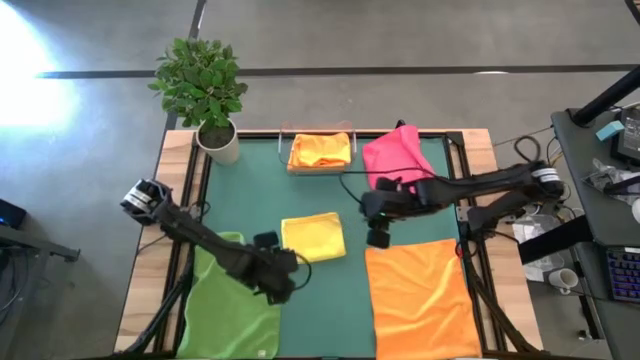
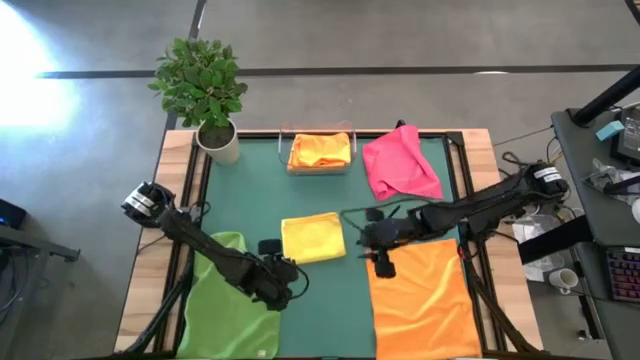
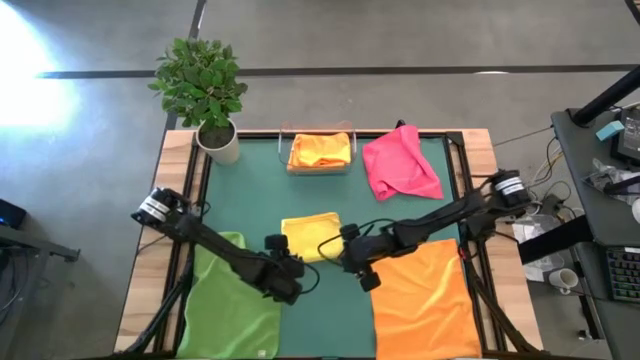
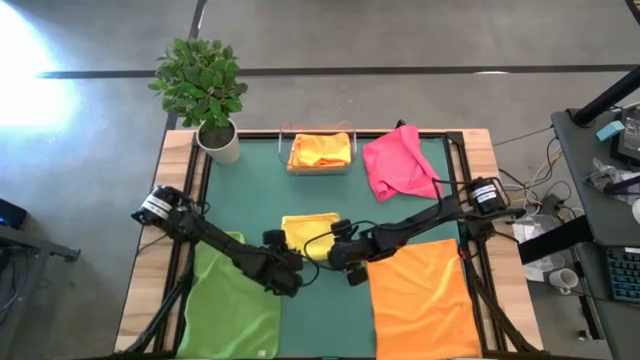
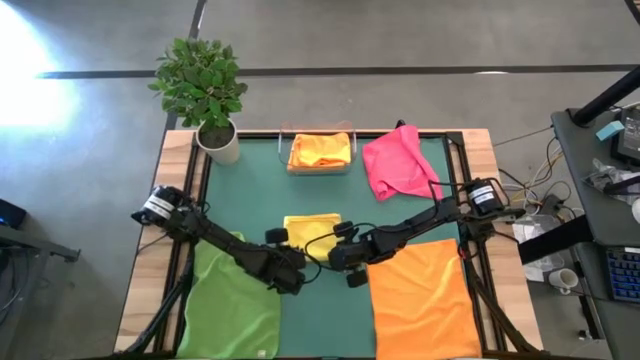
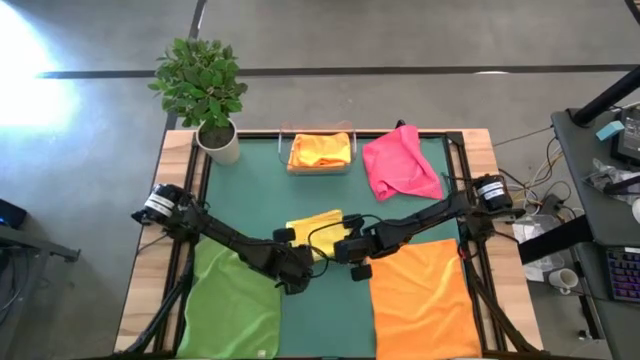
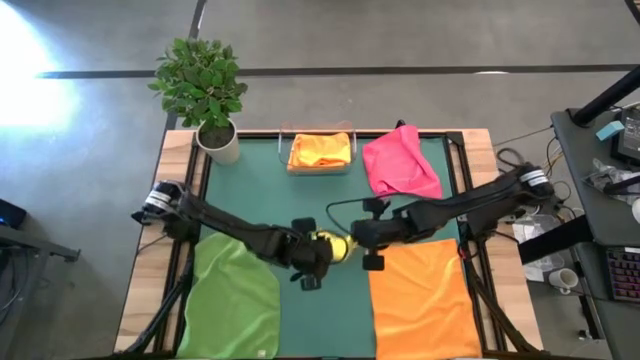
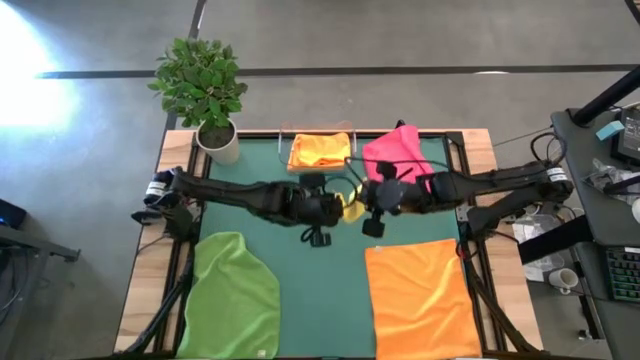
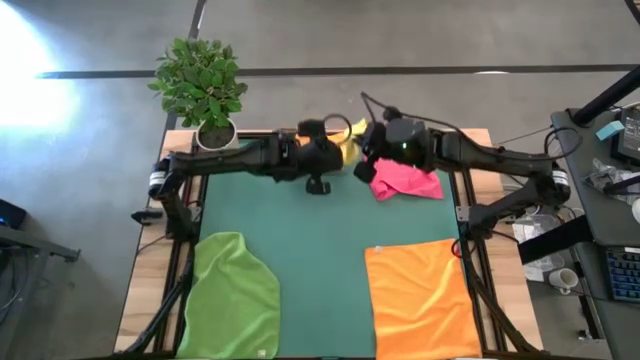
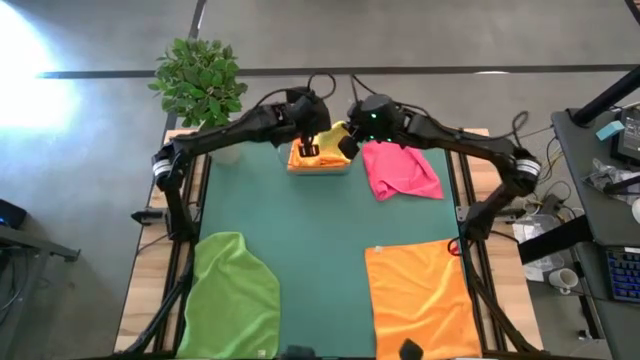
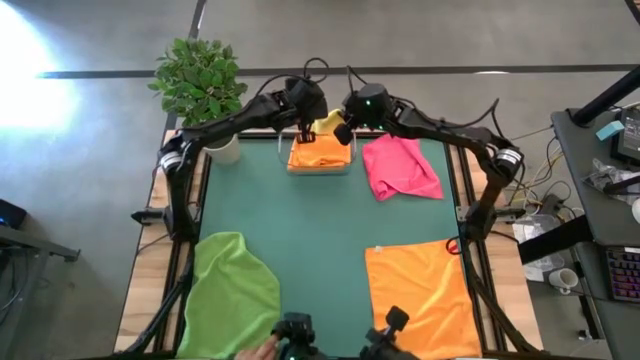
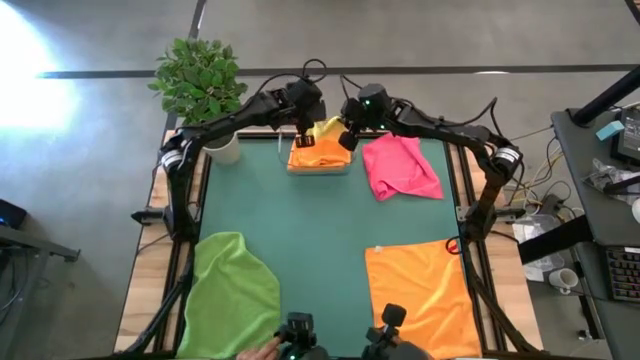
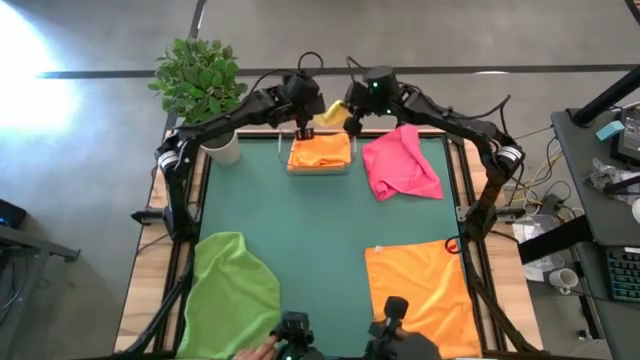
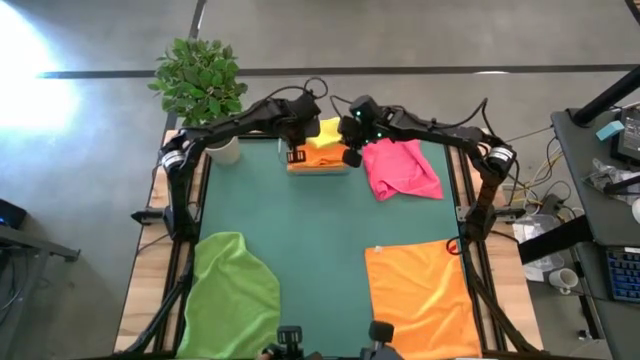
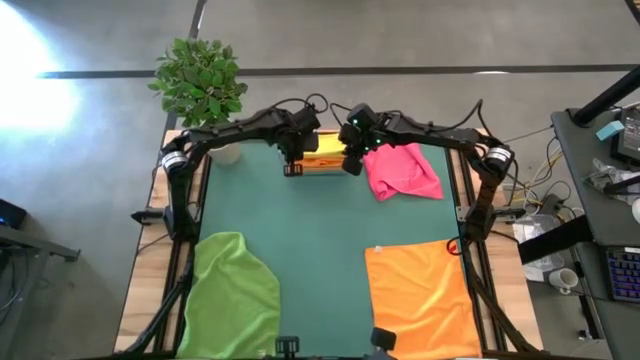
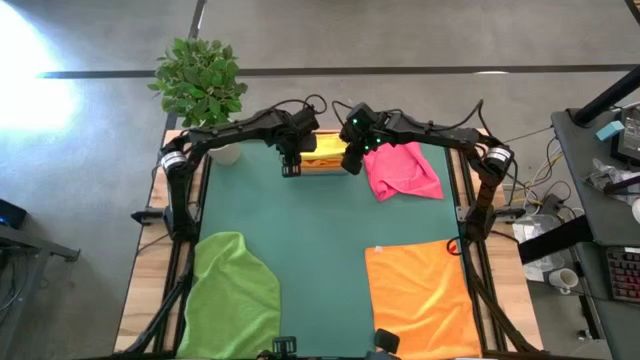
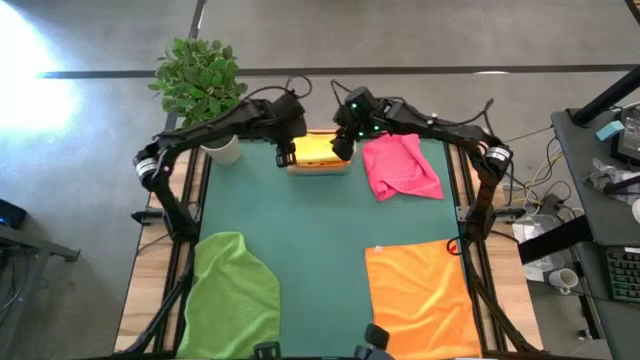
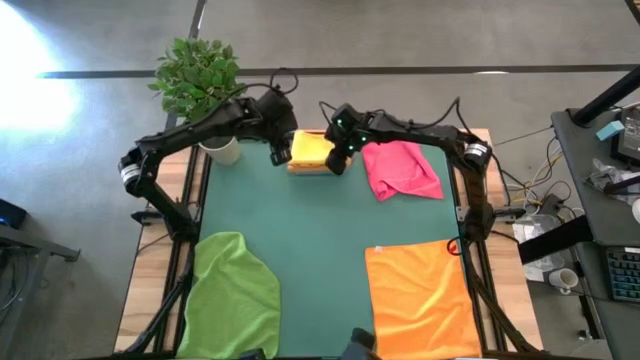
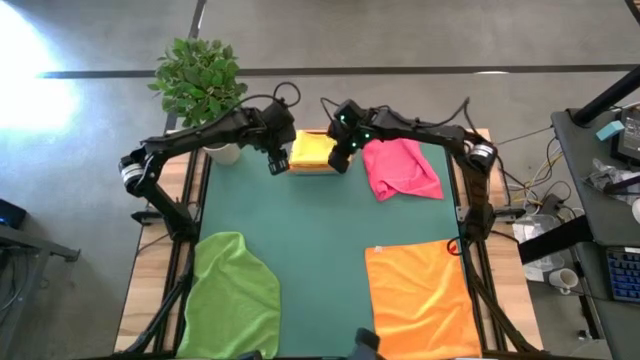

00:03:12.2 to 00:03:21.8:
Task: Fold microfiber towels
Put the folded yellow microfiber towel into the transparent bin
